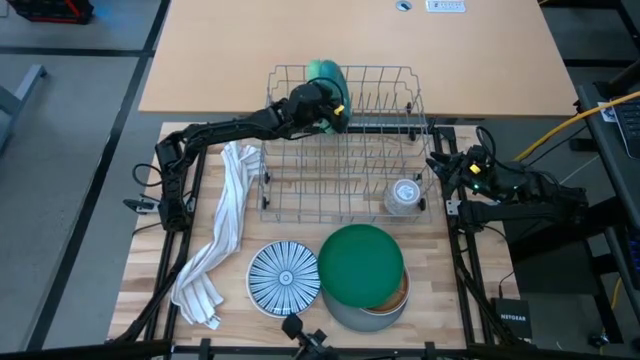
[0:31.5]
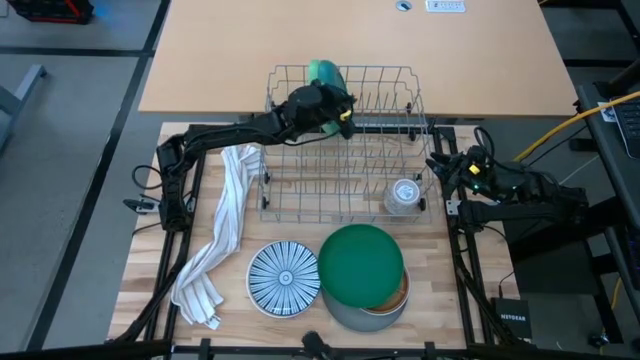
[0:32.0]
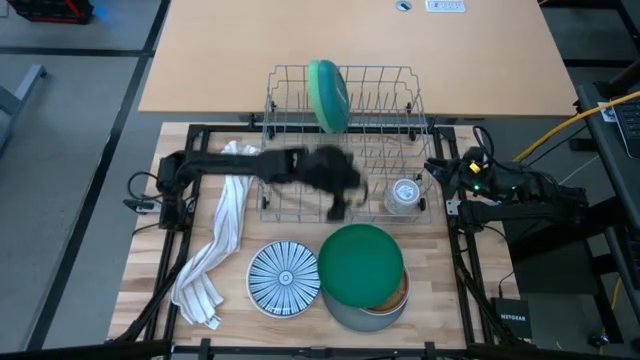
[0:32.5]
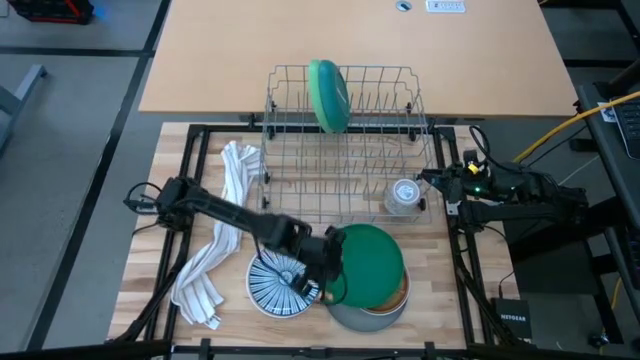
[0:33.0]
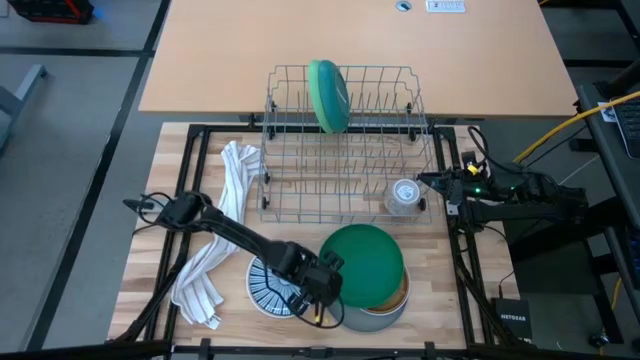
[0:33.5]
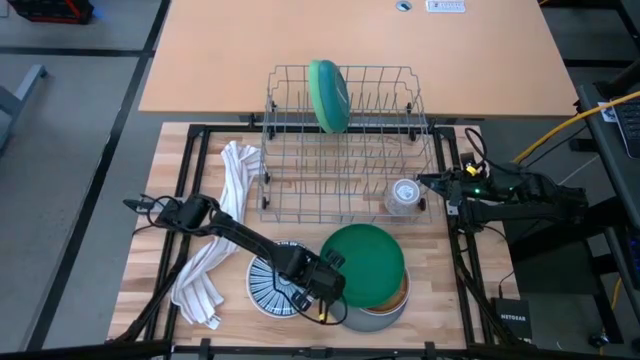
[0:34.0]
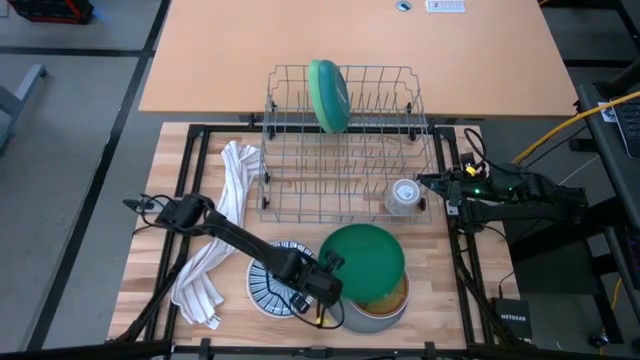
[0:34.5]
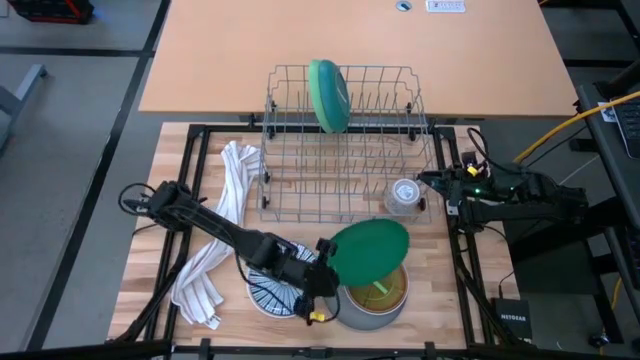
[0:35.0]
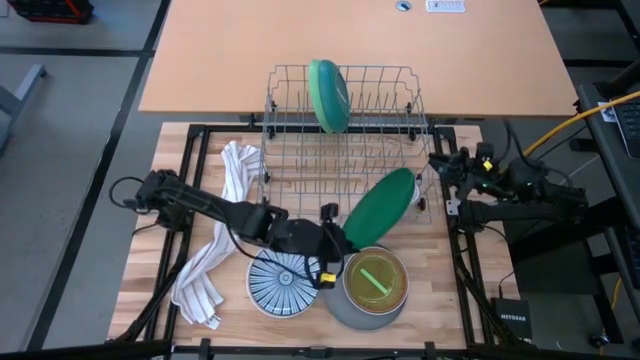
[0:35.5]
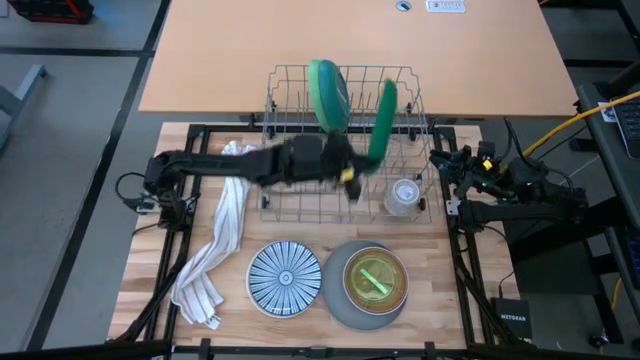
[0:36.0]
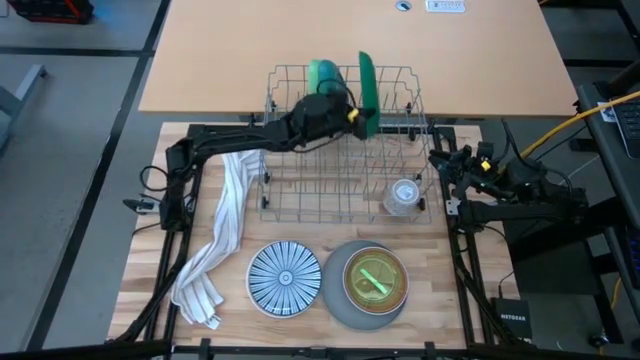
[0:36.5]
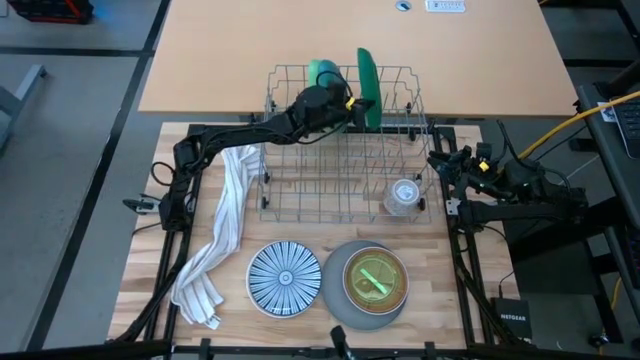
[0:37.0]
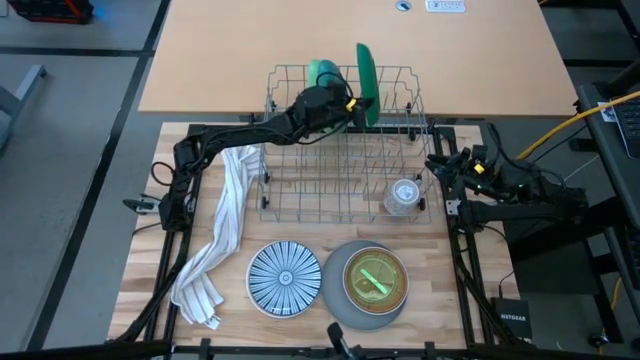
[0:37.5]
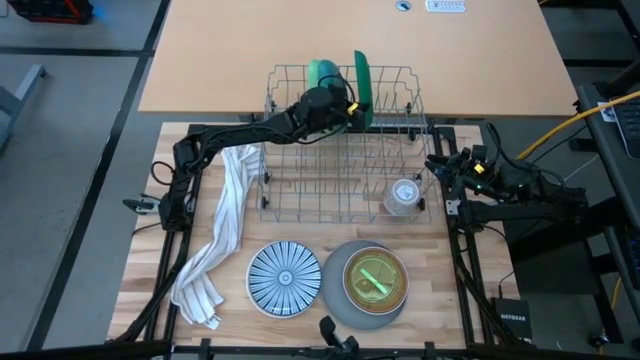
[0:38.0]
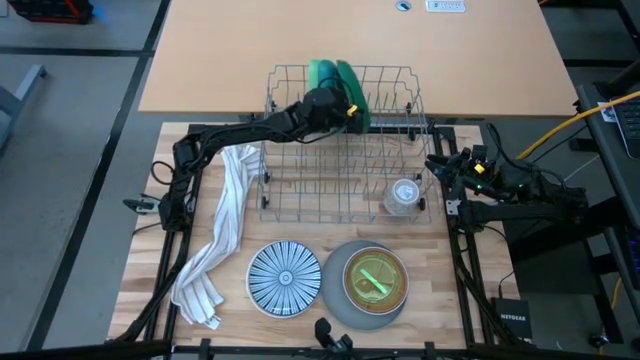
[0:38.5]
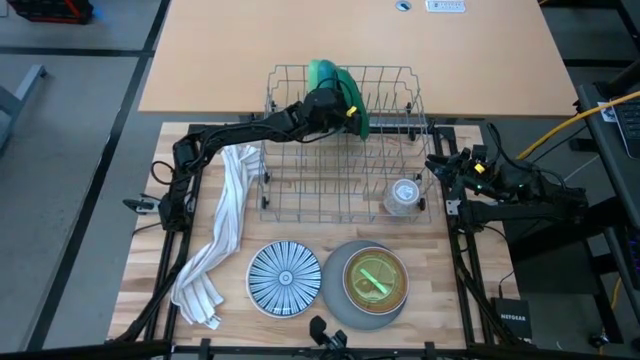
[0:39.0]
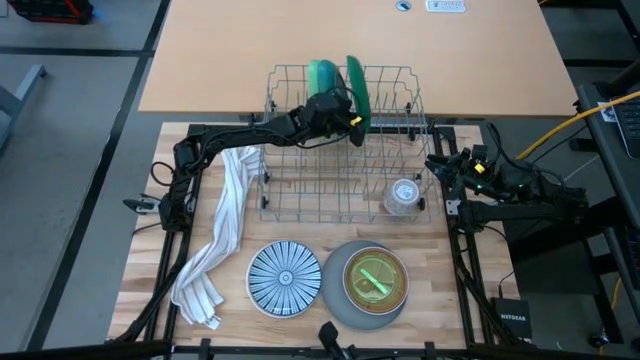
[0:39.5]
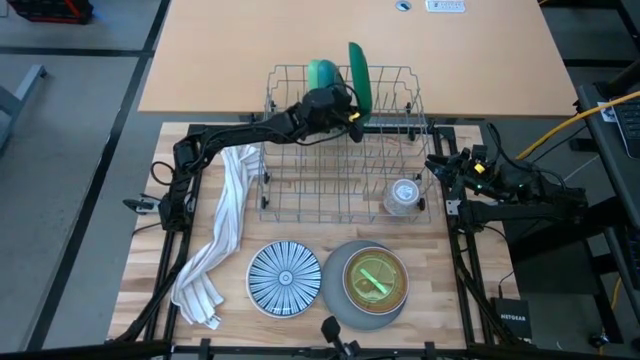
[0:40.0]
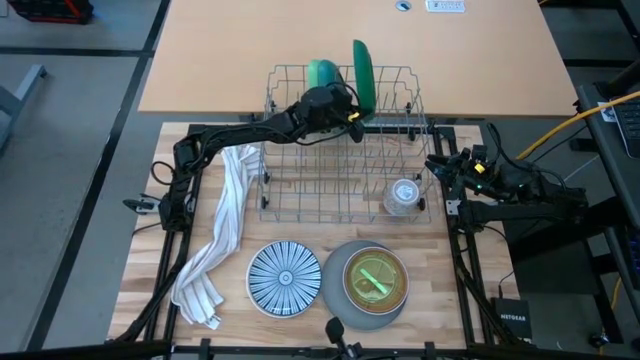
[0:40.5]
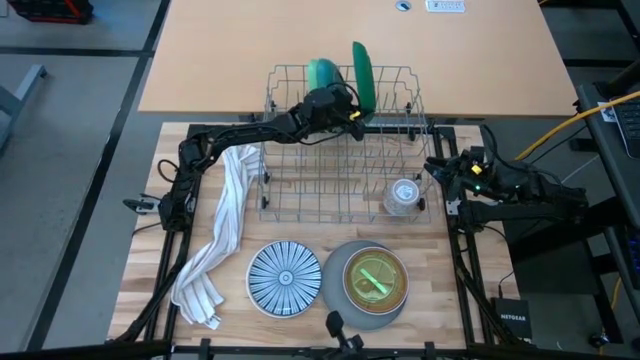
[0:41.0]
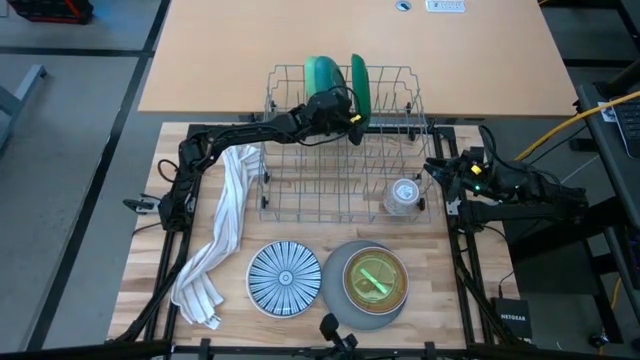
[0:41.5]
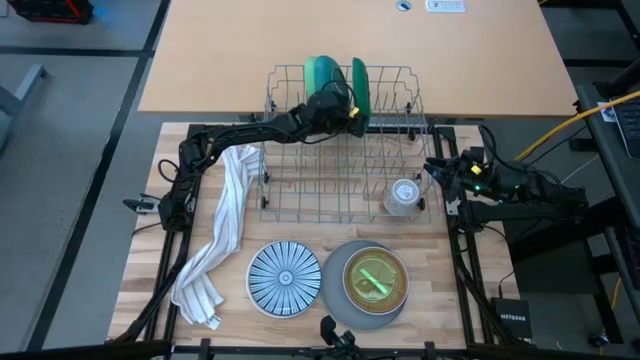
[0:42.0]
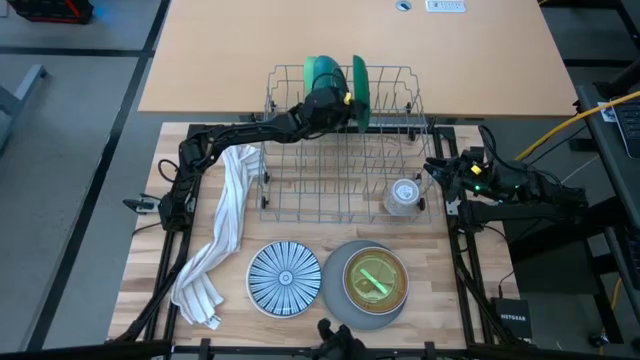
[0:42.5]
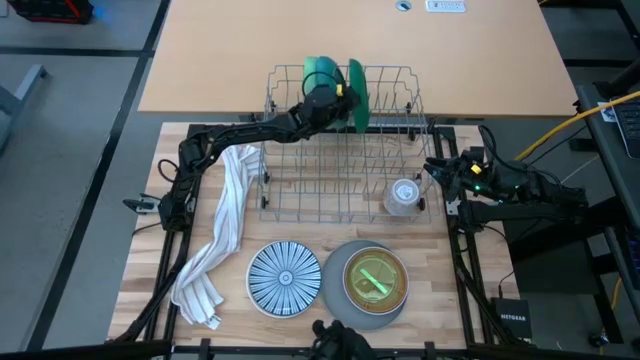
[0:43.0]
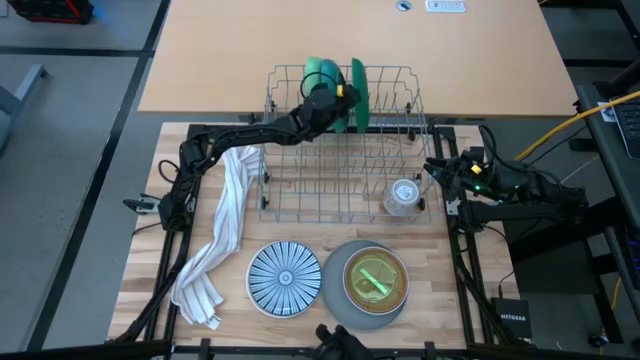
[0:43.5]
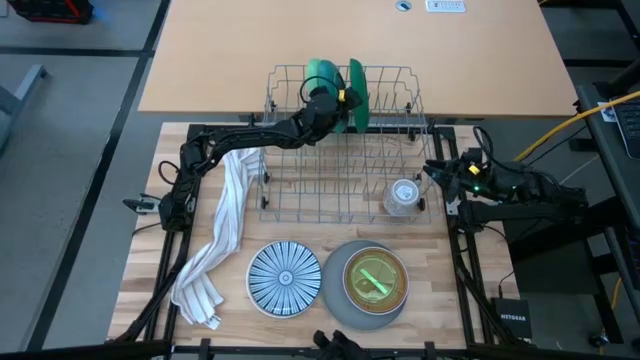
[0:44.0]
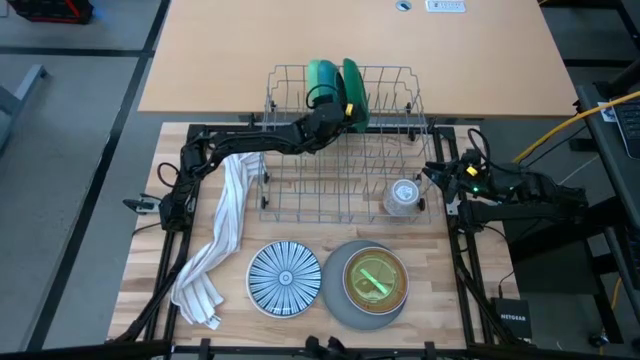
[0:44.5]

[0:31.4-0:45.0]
Task: Sort dishes
Put the green plate into the dish rack
